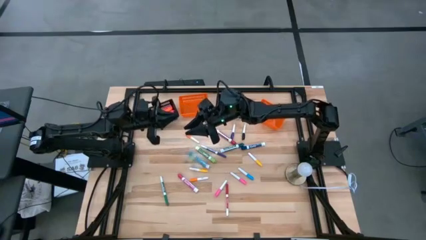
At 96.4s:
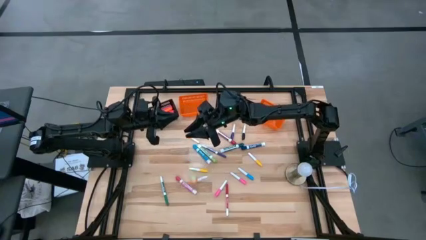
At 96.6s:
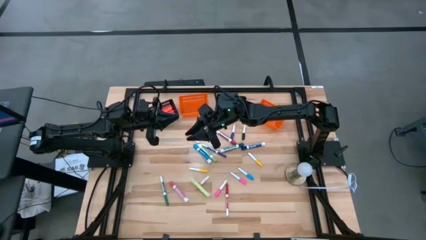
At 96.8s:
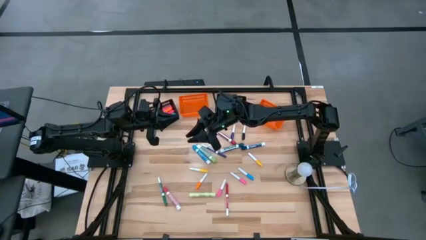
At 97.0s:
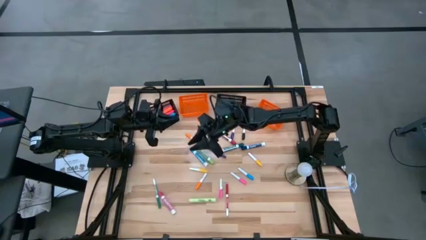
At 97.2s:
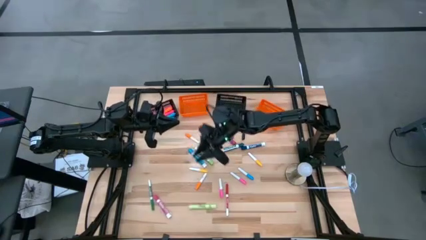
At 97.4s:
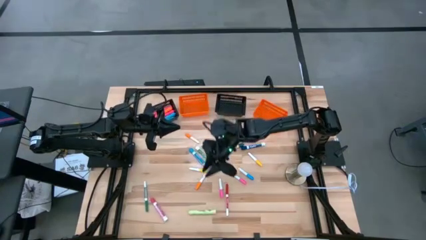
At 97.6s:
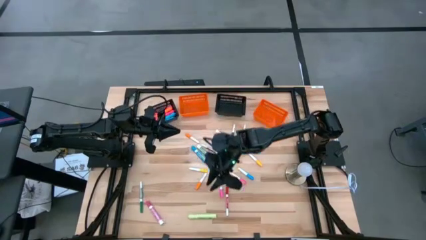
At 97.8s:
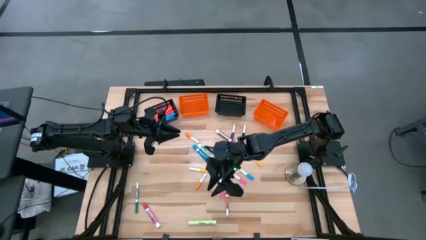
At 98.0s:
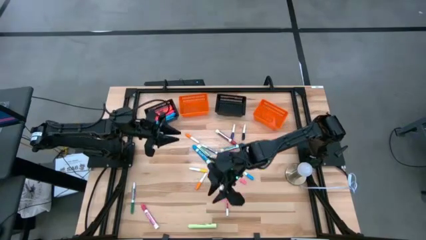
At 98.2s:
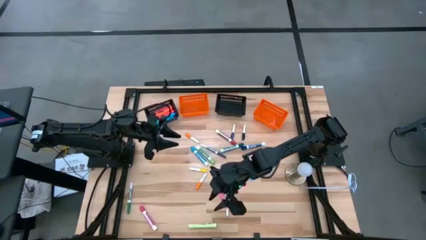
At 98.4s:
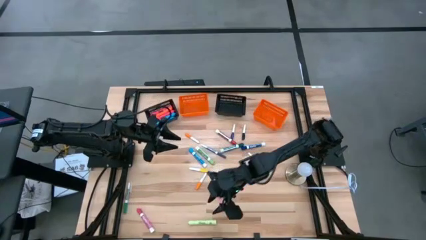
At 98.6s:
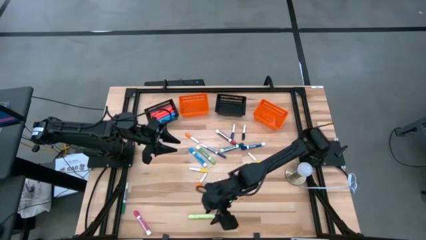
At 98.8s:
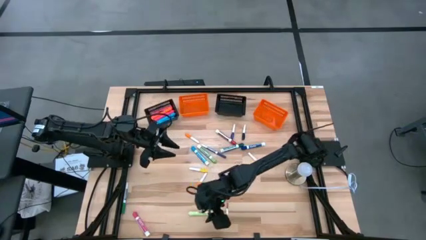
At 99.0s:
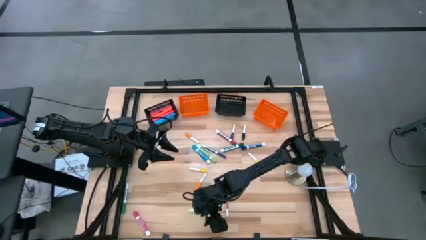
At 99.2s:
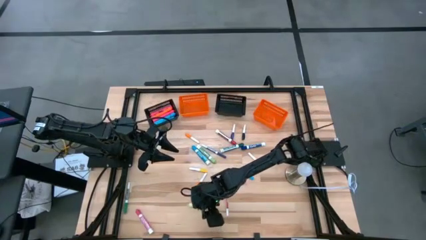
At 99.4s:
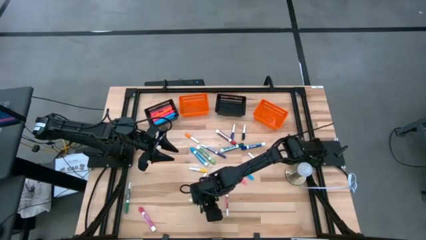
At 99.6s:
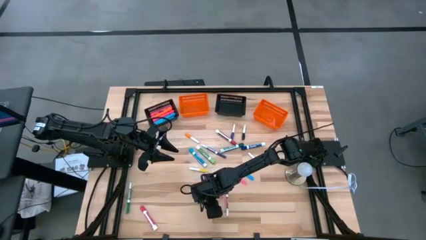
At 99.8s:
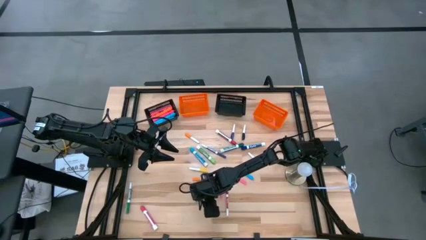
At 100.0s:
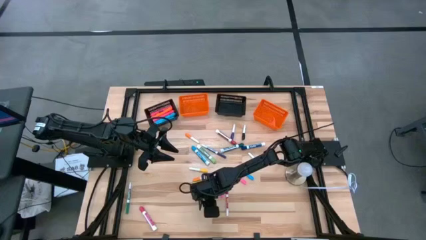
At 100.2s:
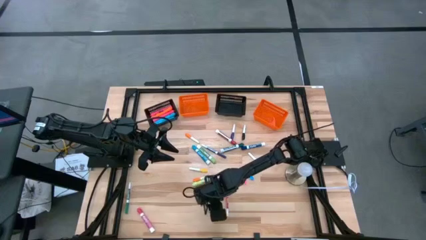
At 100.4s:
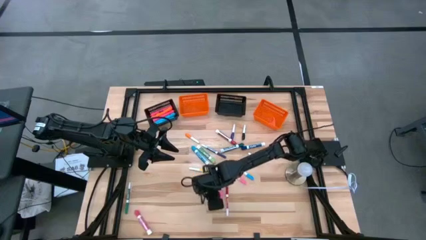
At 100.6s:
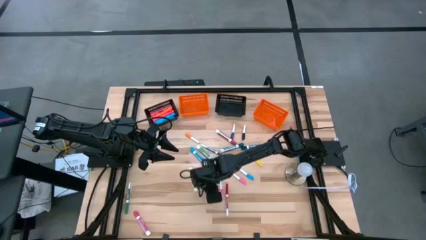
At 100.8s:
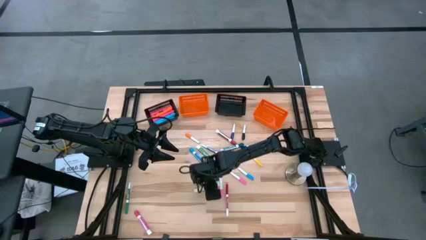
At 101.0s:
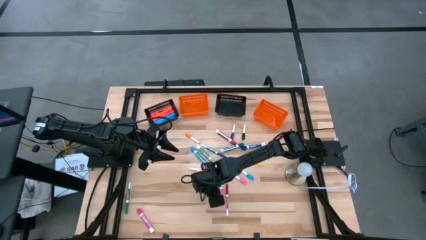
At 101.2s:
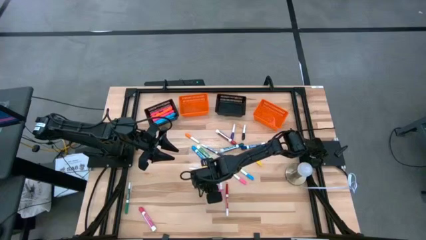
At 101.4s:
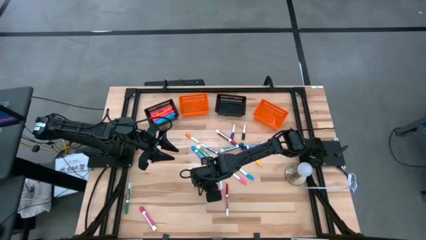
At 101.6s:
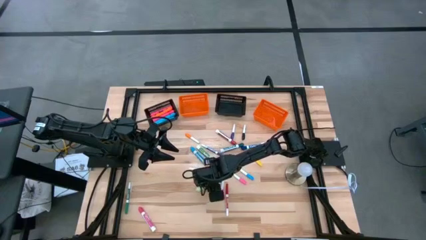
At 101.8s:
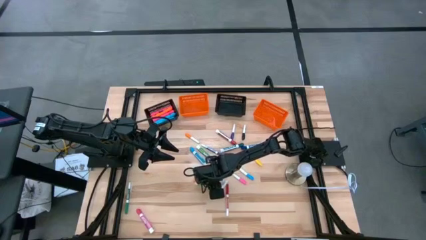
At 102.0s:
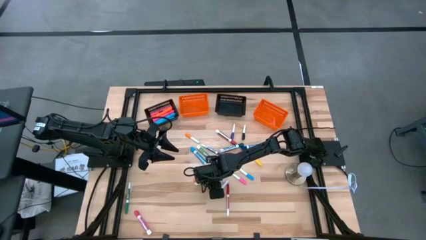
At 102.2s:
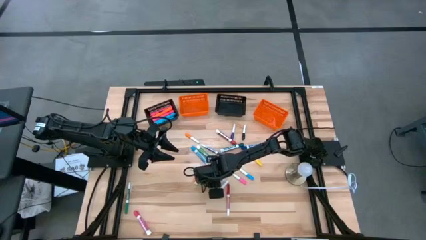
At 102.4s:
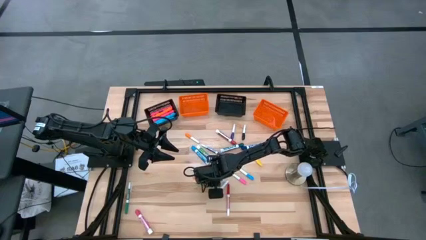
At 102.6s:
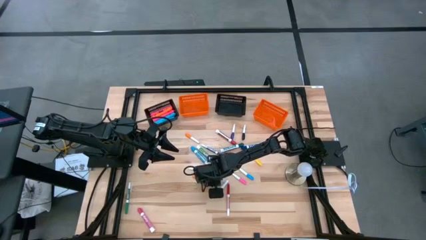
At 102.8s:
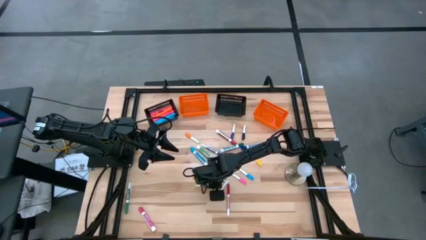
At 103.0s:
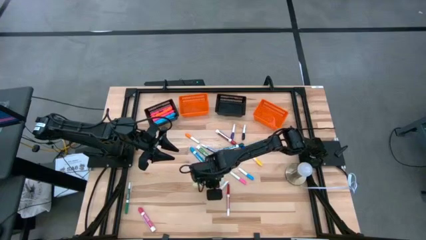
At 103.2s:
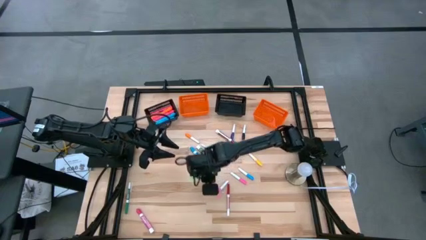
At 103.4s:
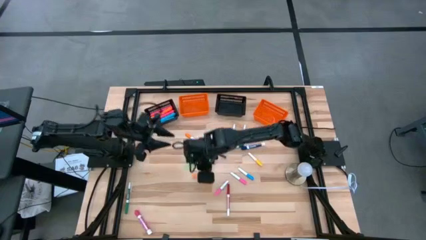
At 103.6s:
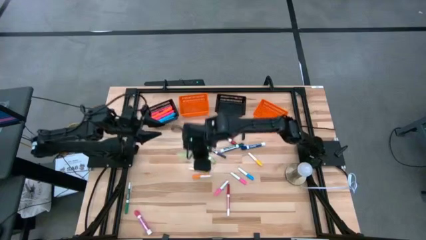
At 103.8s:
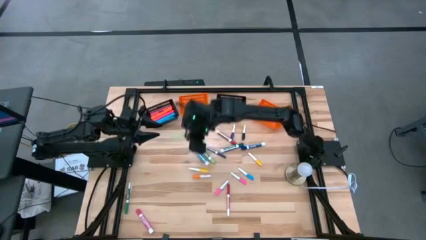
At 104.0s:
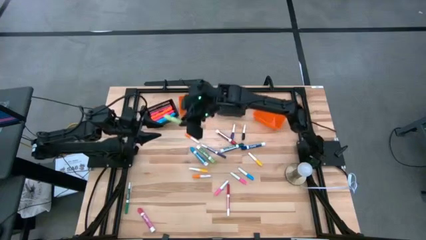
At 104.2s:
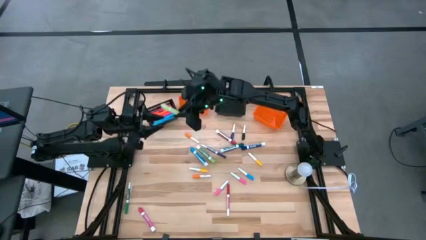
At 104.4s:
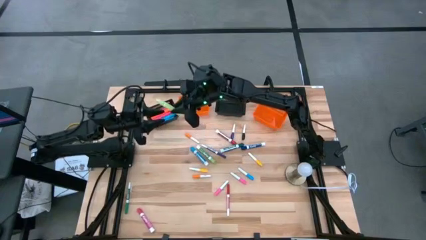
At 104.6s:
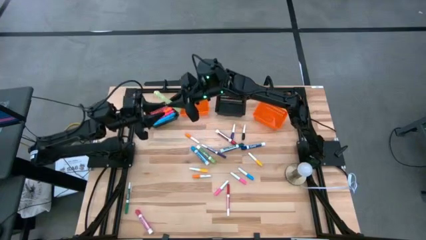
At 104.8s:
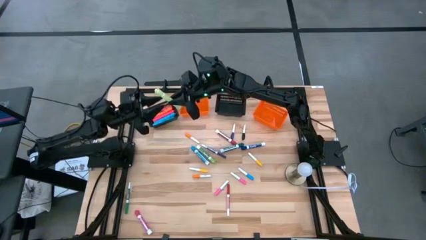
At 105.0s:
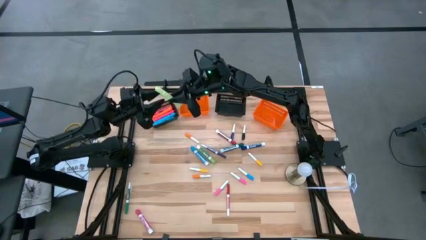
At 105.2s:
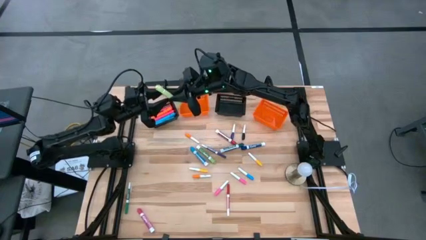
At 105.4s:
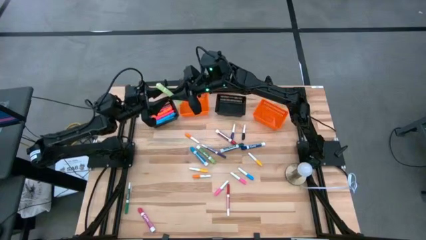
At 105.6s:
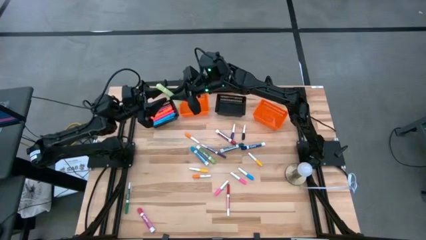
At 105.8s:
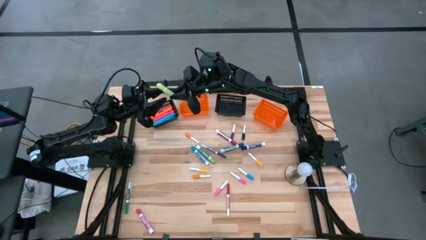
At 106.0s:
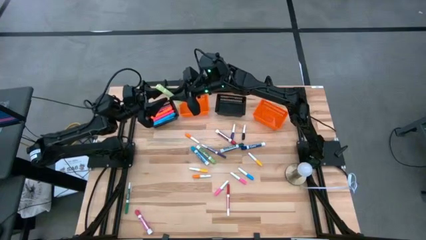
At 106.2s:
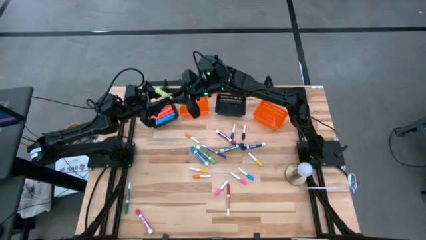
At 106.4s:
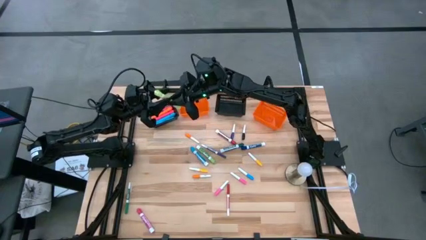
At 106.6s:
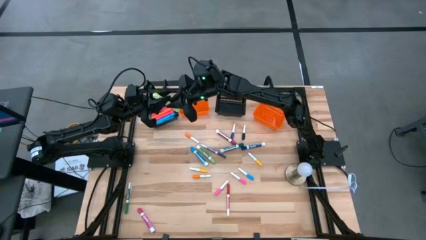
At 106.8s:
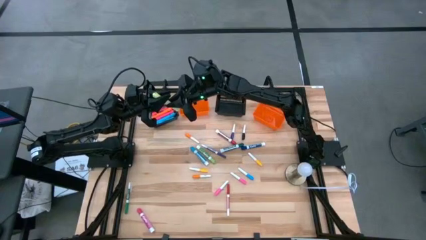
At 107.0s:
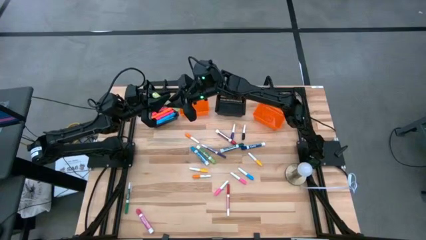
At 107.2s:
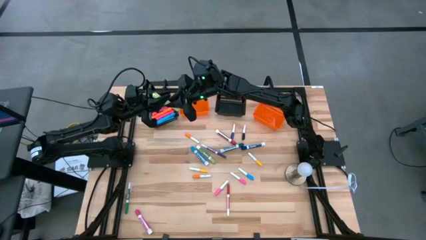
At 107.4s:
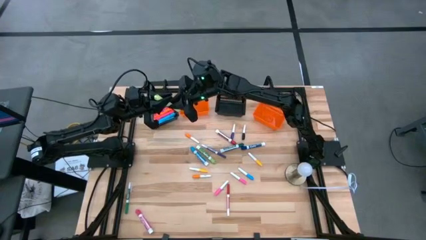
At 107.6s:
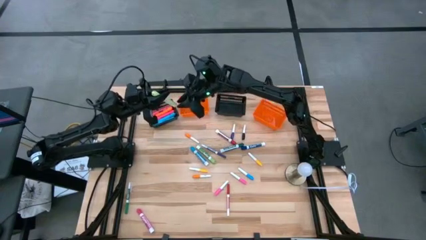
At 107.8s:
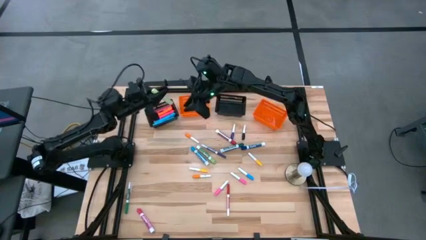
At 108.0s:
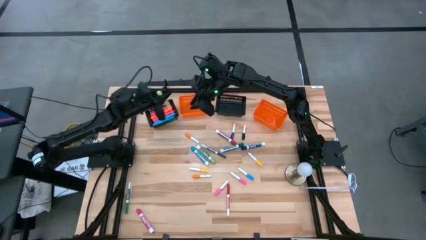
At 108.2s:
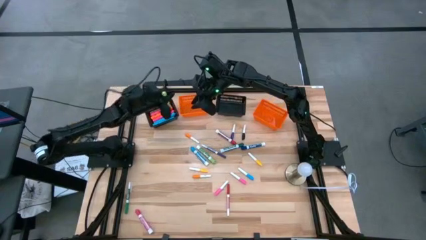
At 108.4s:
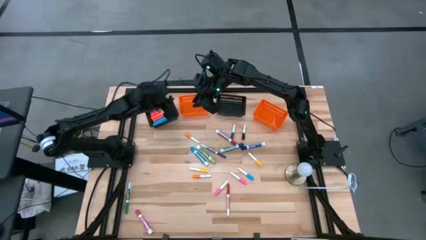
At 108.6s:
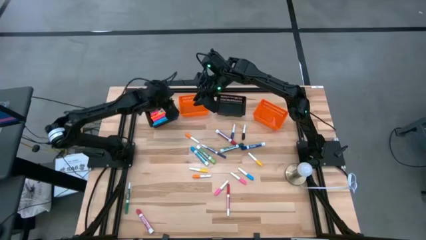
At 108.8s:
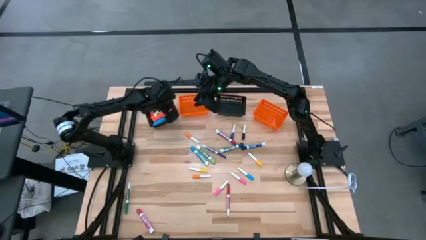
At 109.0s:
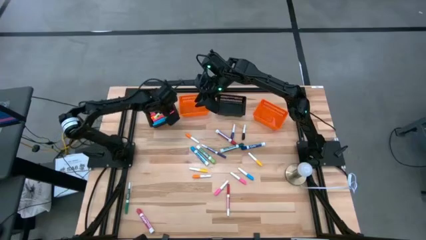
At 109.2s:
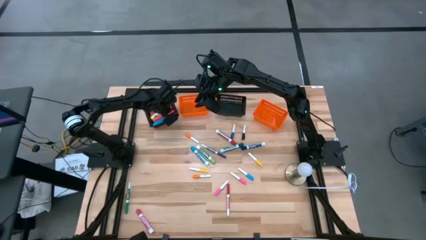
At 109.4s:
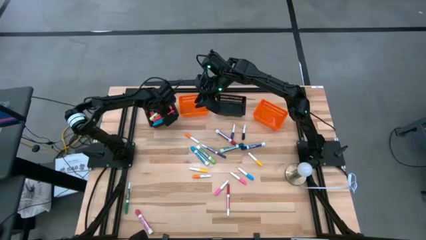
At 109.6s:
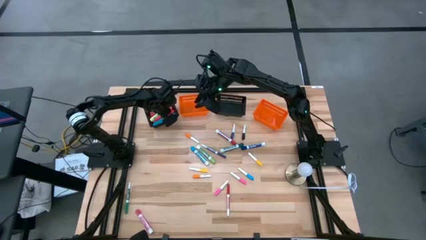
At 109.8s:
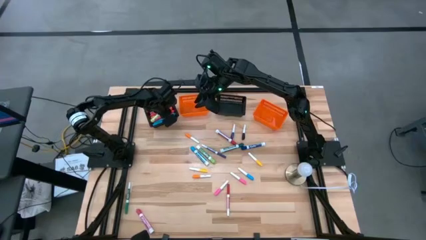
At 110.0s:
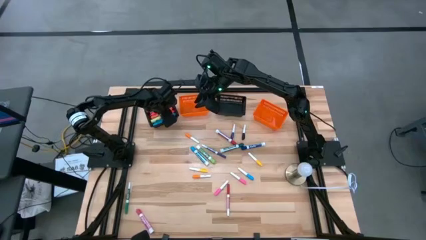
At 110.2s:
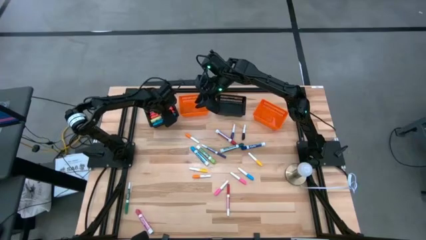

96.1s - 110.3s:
Task: Pick & Place Markers
Put the light green highlighter pen into the left black bin

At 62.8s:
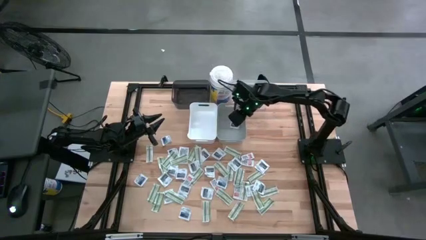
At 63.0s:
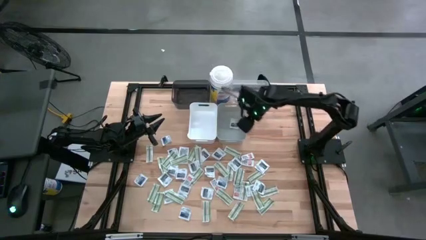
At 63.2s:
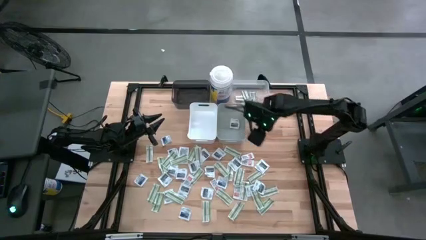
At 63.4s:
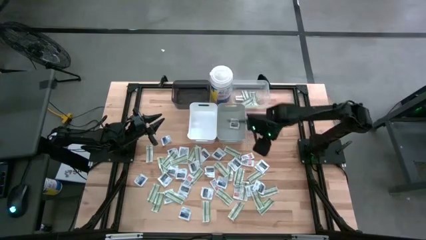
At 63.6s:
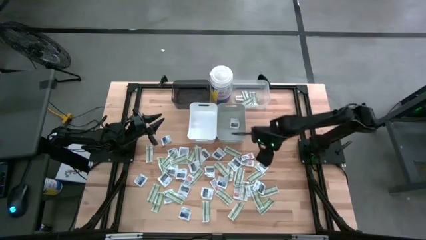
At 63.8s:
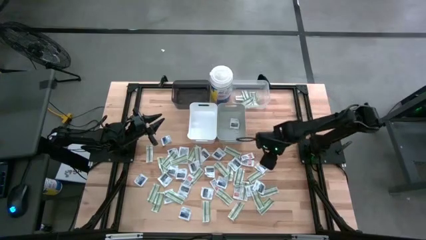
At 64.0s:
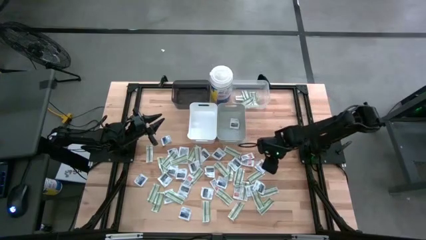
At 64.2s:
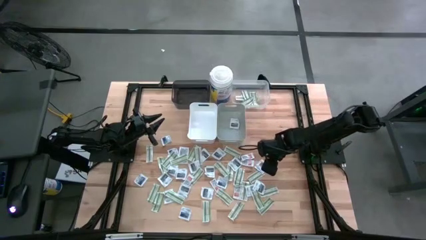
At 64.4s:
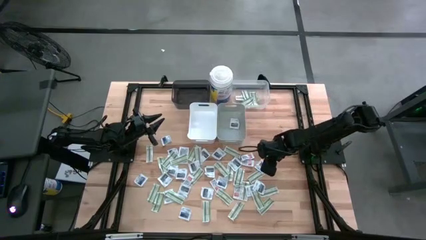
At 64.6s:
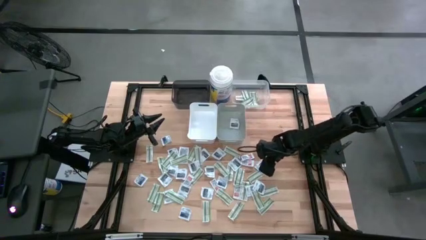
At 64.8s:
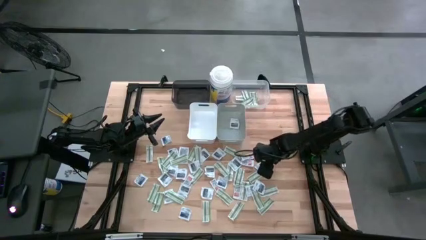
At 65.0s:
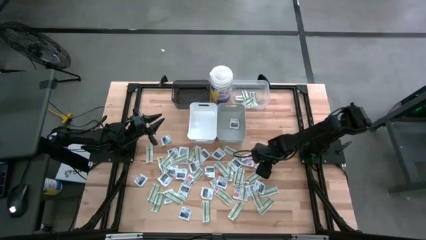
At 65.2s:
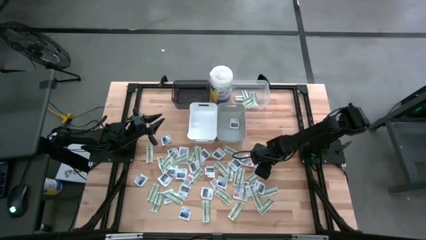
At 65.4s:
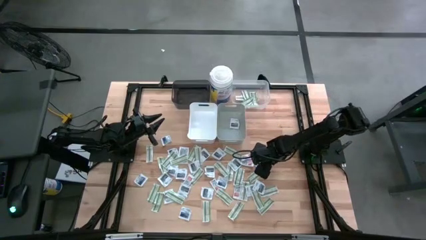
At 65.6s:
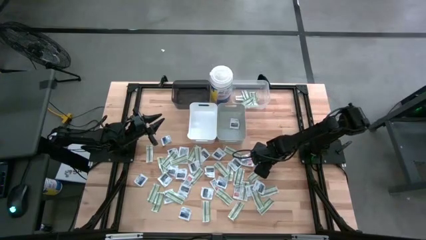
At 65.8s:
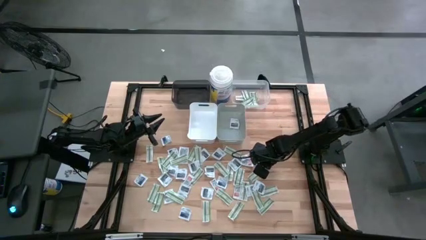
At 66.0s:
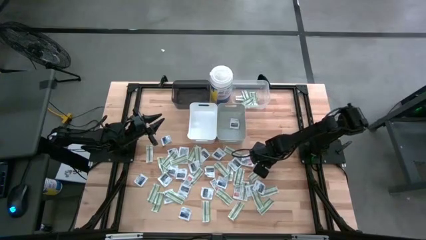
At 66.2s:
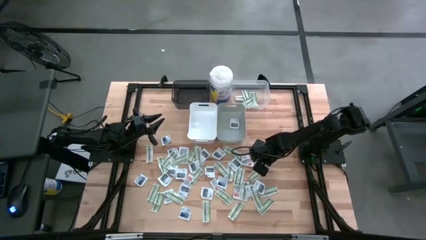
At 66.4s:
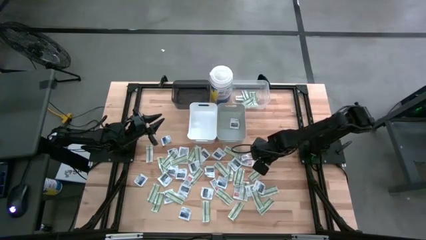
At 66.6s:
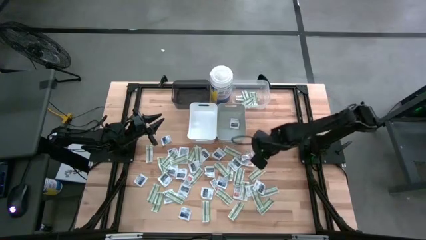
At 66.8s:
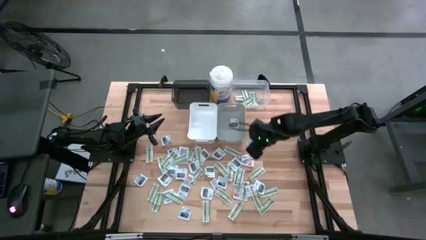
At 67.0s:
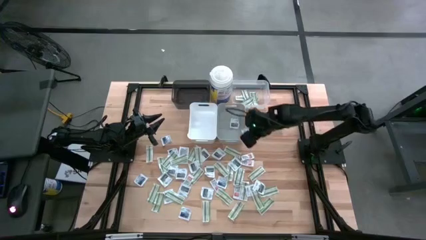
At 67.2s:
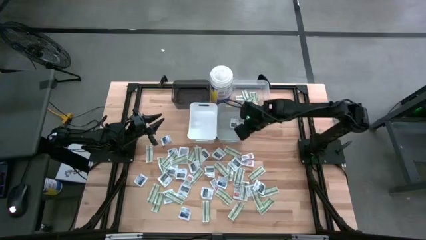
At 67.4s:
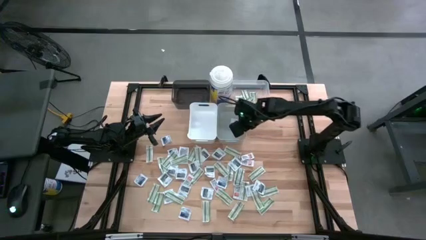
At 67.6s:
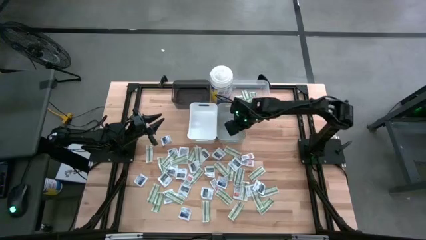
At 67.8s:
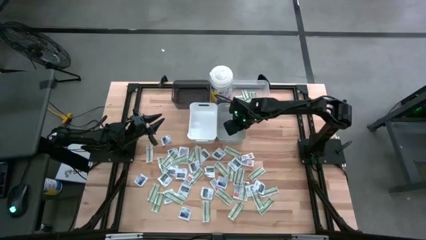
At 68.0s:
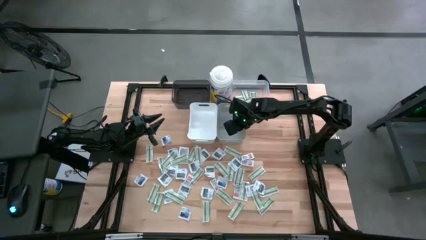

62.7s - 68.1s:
Task: Pick & Place First Aid Supplies
Put the wipe into the gray bin
